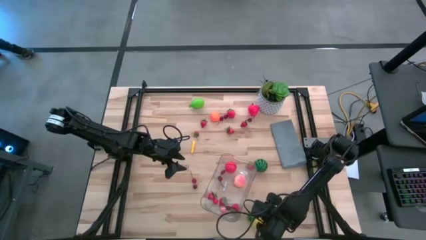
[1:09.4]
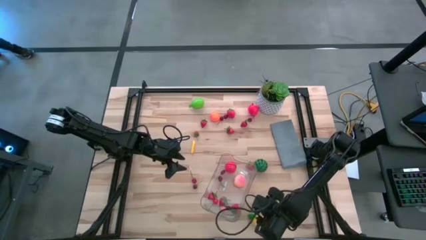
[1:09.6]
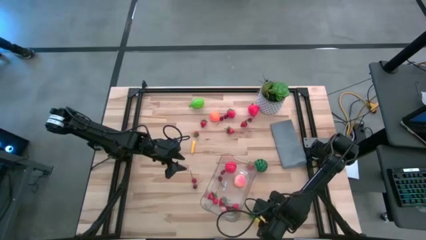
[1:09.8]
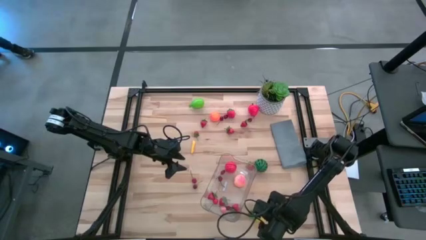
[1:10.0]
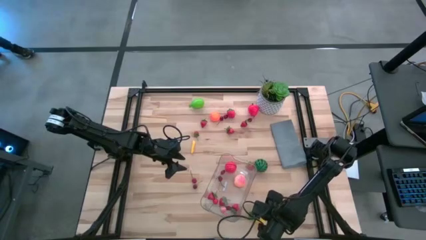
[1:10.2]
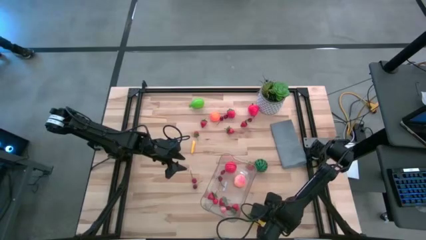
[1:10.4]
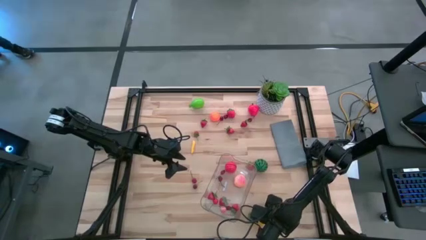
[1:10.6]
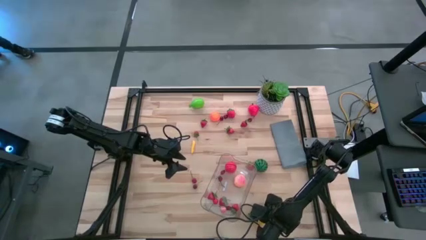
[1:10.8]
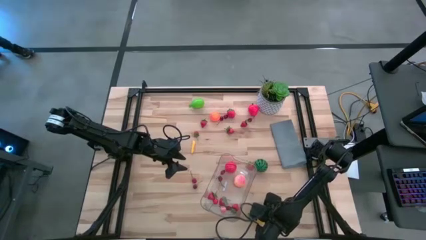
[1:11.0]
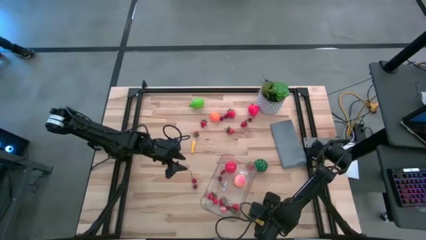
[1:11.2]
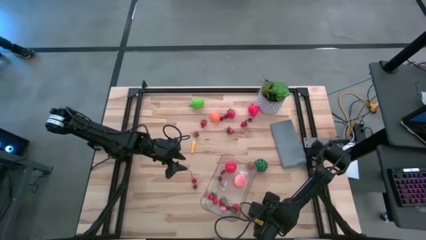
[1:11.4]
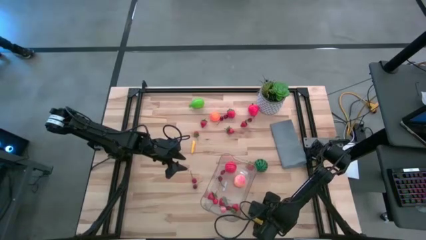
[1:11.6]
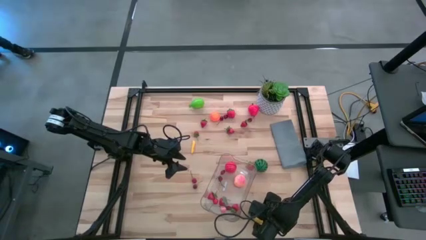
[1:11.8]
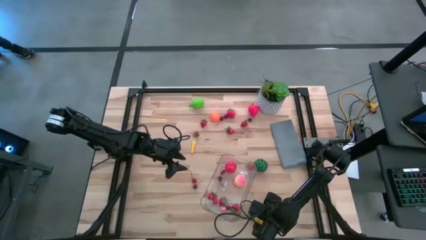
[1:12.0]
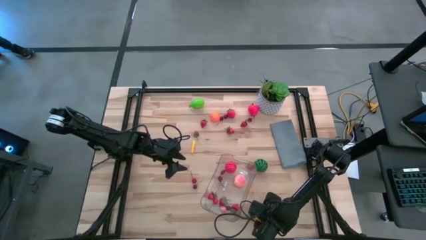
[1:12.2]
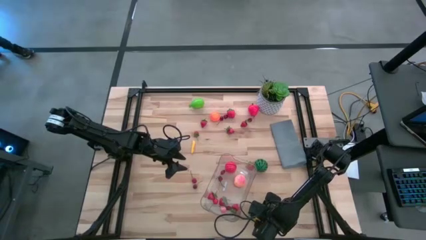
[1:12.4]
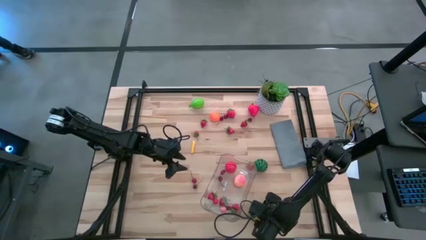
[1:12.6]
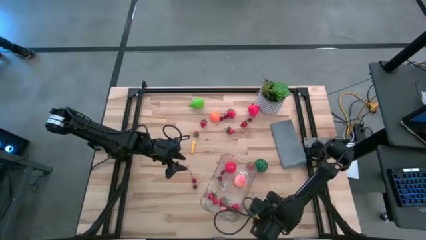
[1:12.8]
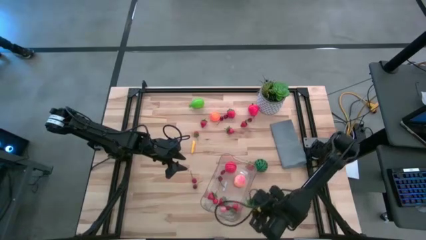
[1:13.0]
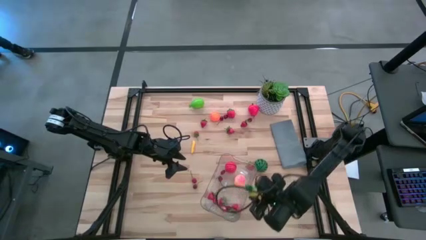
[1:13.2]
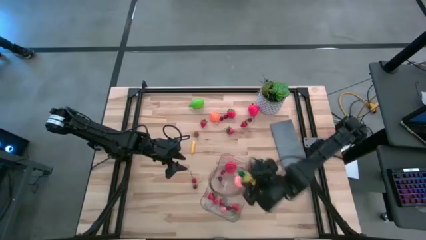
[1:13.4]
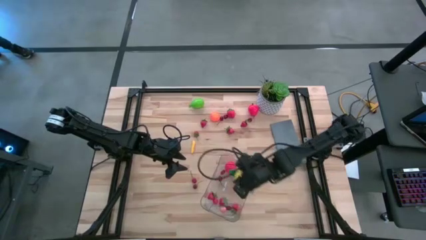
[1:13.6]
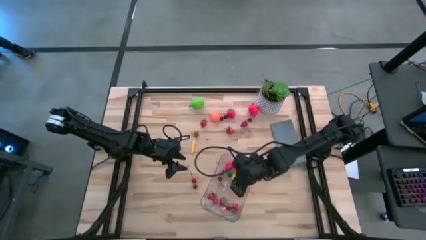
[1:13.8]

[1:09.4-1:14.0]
Task: Pick and placing Produce into tupperware
Put the yellow pineapple into the transparent basket

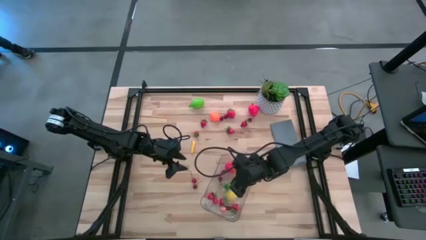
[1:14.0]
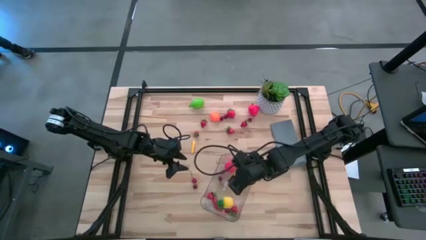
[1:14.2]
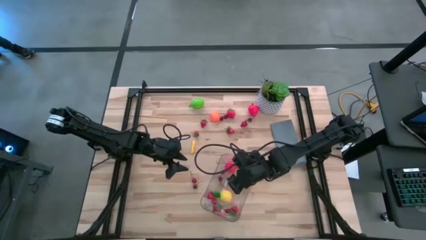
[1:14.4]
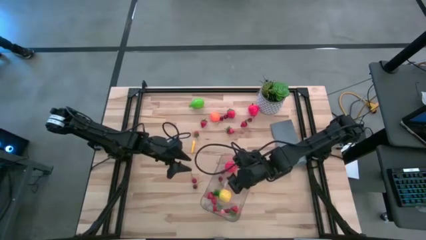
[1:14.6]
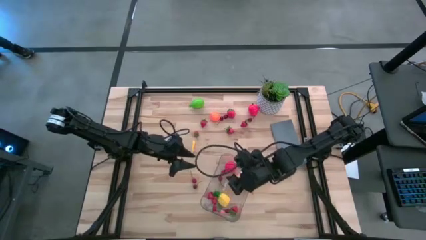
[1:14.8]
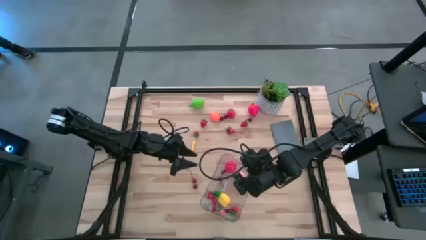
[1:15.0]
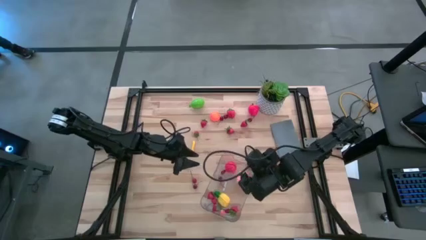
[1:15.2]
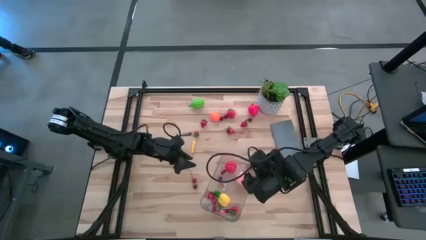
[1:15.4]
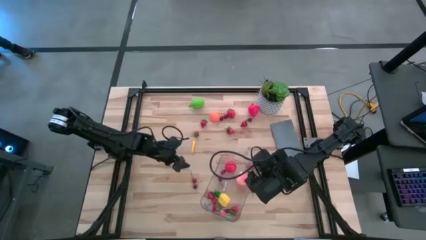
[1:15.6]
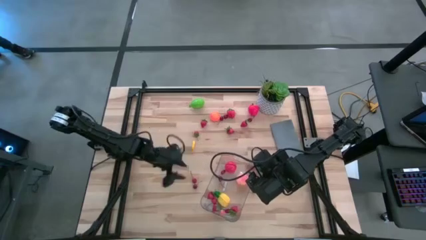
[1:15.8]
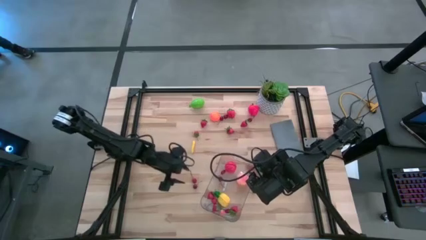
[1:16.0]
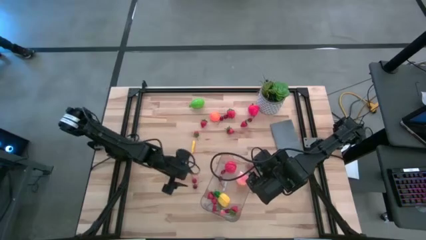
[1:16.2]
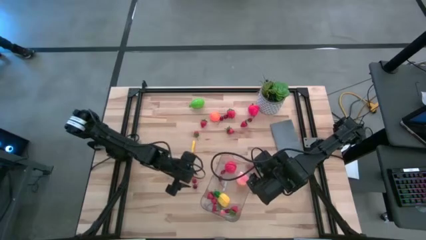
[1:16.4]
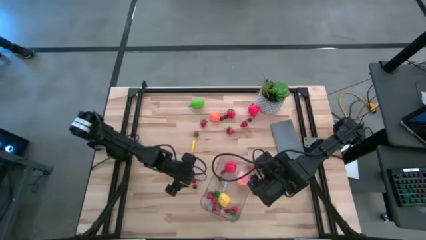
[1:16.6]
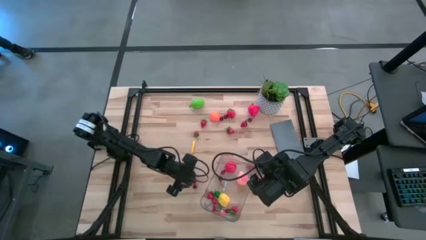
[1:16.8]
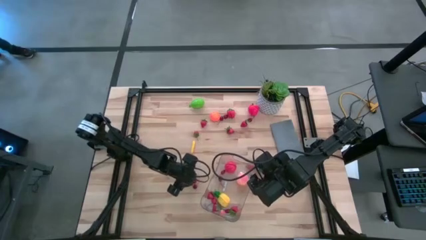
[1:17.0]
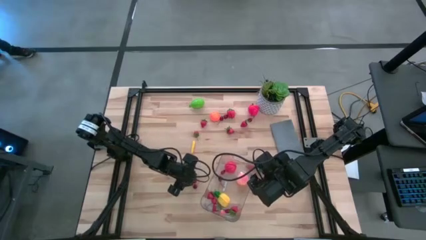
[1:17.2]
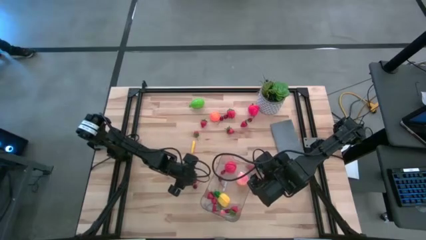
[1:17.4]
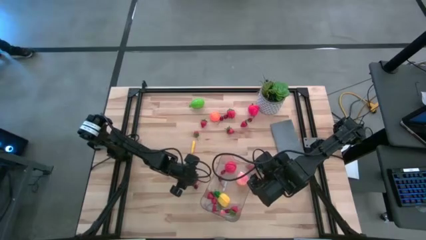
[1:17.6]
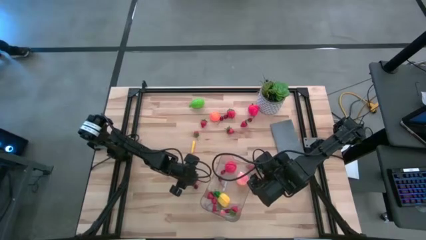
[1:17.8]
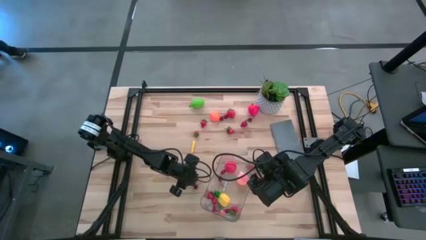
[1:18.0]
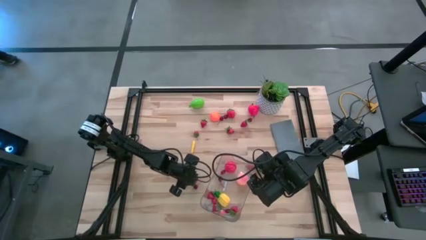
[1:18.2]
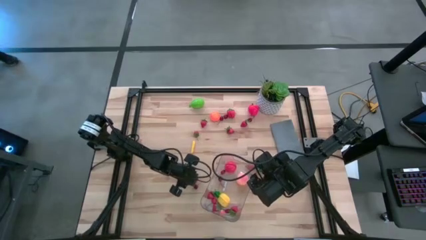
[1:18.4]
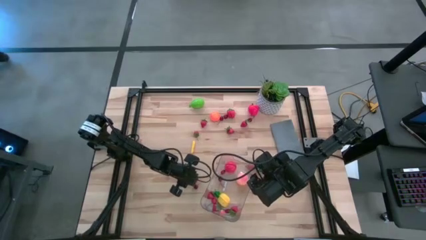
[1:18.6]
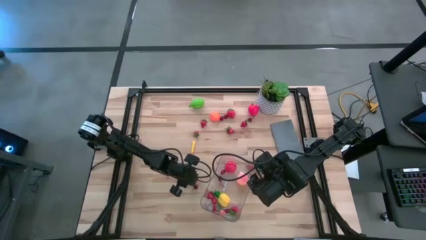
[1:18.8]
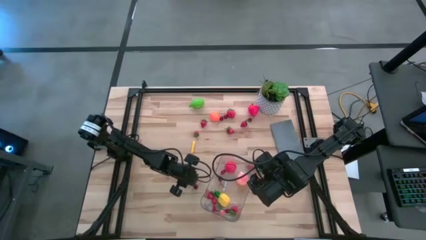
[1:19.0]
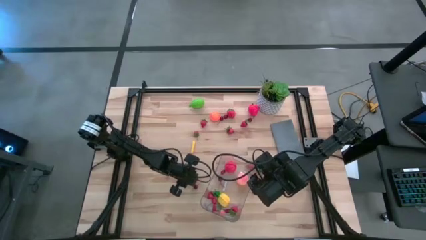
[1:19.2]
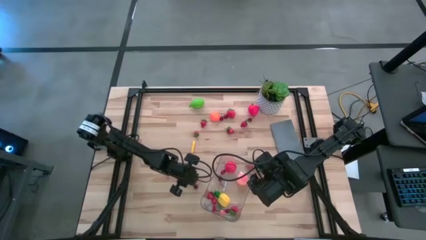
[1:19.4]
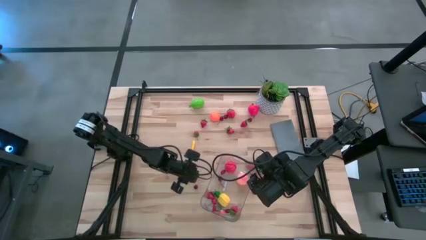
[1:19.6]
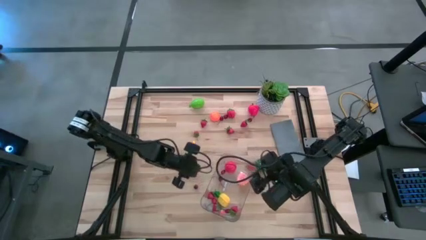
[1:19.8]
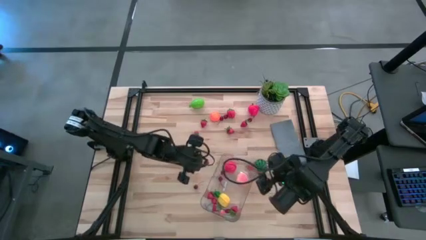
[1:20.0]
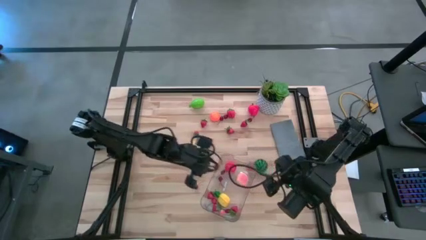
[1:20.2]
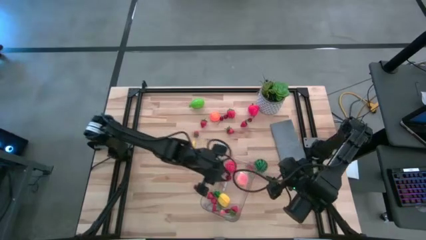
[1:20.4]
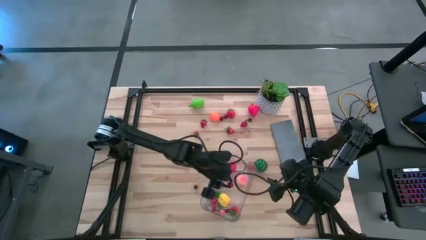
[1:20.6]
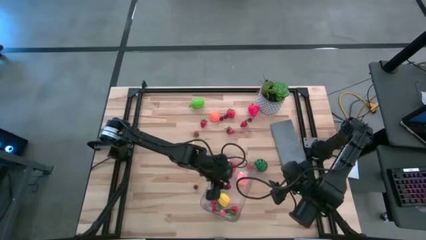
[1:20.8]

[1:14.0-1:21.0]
Put the red cherry into the transparent basket

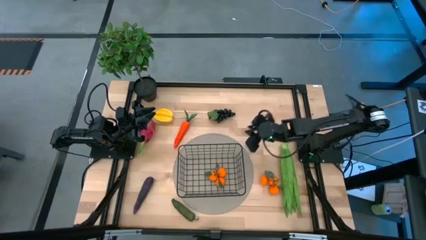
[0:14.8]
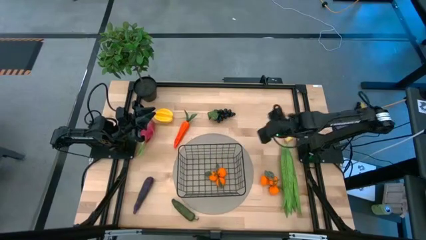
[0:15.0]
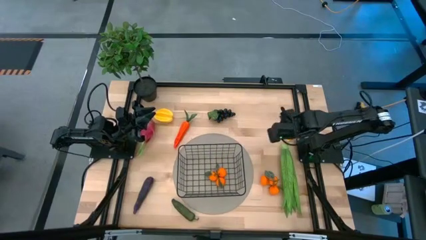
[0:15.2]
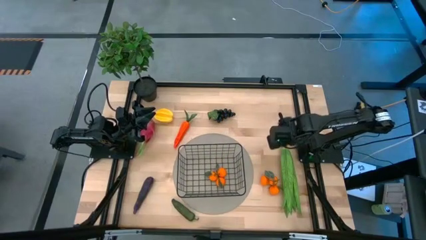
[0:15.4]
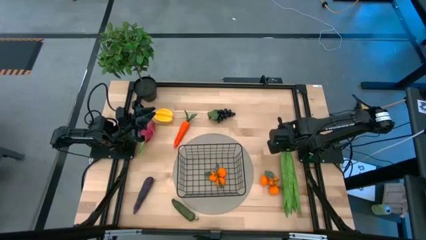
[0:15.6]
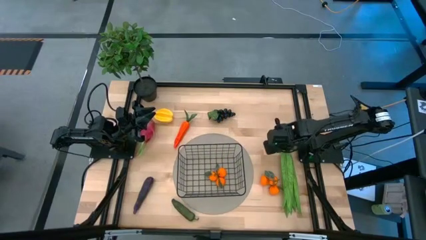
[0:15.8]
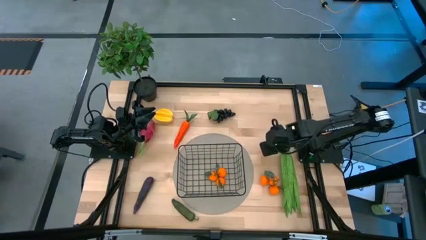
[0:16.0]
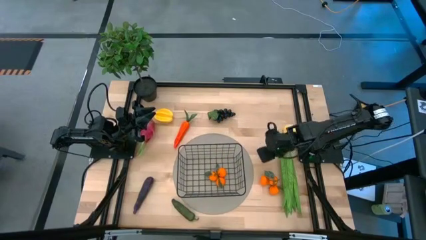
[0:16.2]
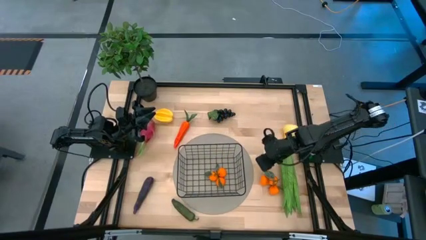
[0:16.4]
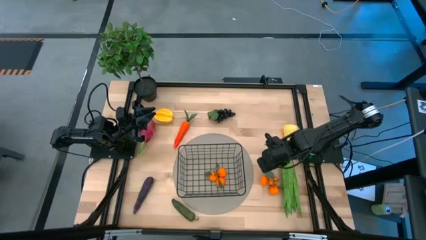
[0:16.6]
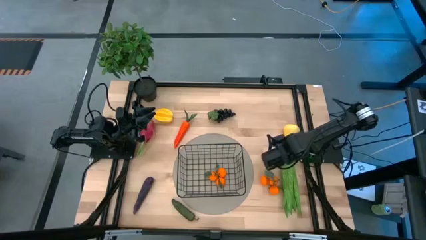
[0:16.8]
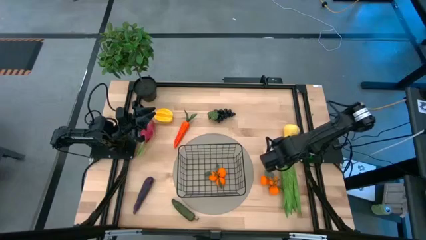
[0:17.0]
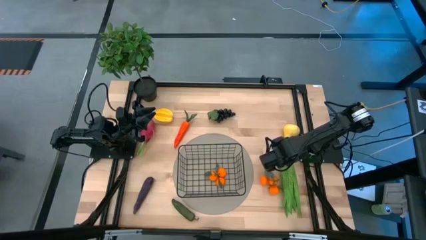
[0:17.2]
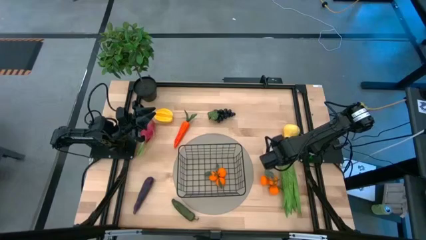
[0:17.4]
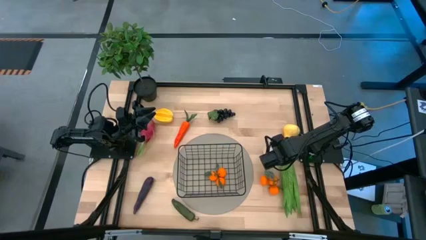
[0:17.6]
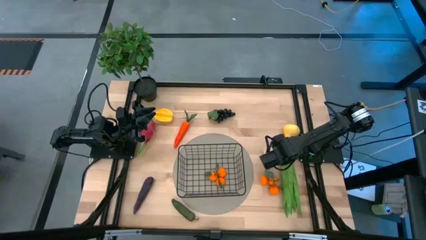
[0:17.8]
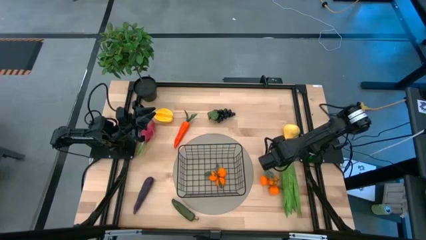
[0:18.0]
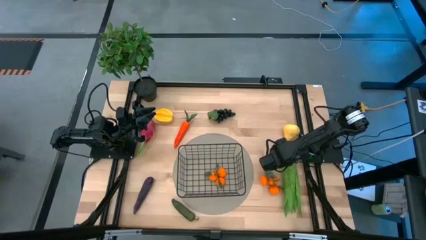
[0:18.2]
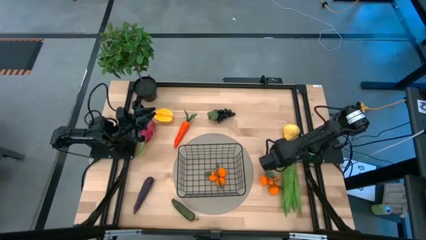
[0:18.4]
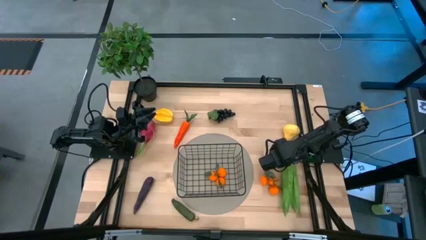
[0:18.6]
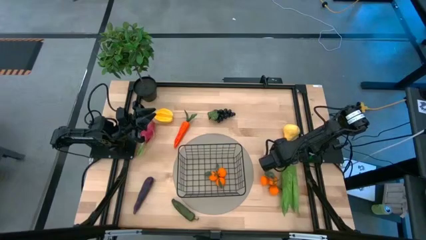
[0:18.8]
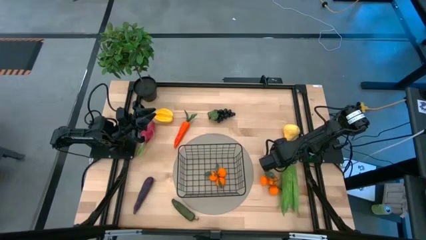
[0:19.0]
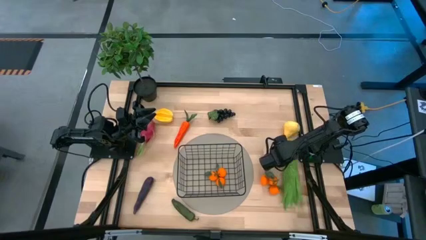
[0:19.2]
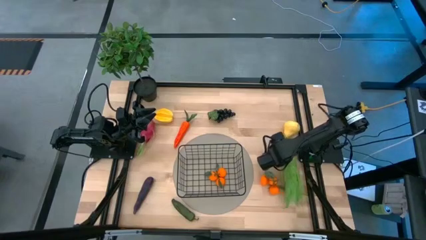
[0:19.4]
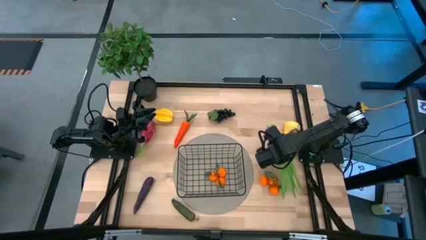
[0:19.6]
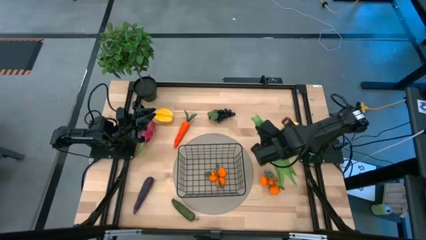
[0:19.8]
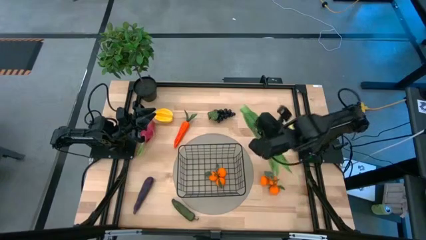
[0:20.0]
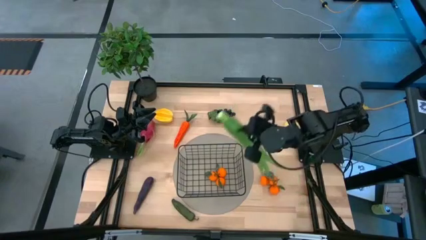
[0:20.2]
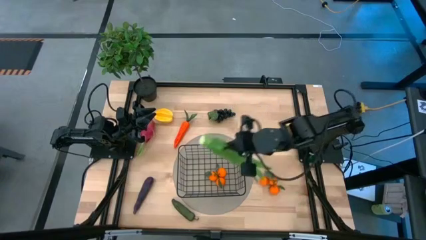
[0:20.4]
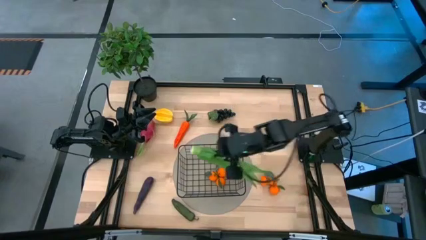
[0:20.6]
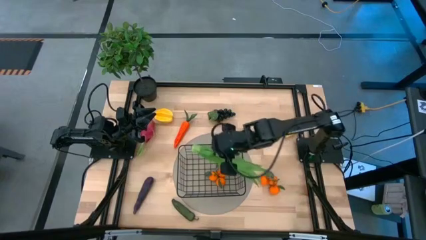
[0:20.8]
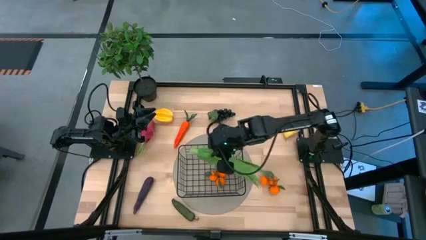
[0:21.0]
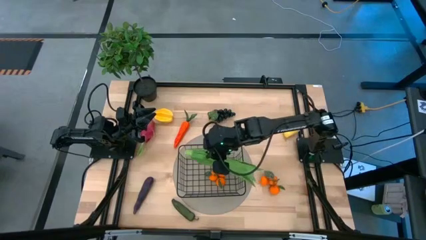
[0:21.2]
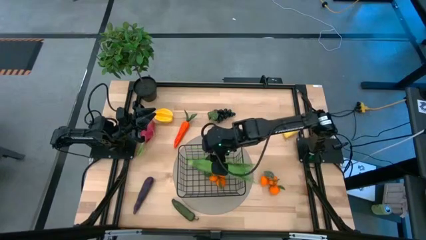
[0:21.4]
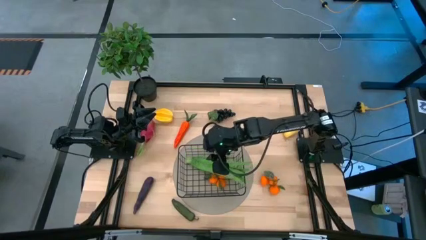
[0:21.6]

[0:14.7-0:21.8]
Task: Build produce basket
Put the lettuce into the black basket
